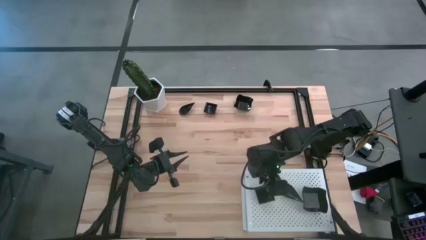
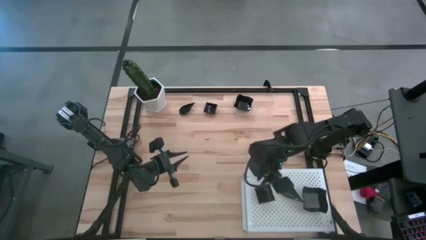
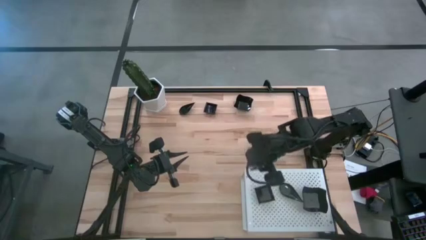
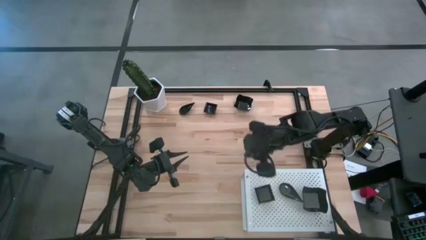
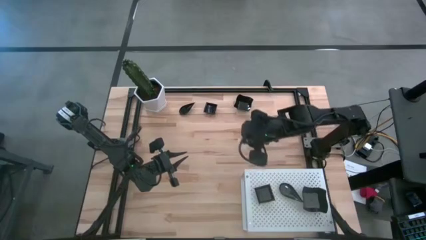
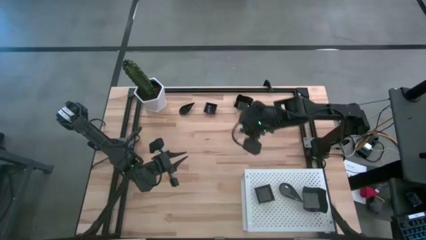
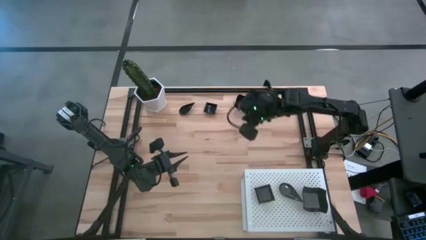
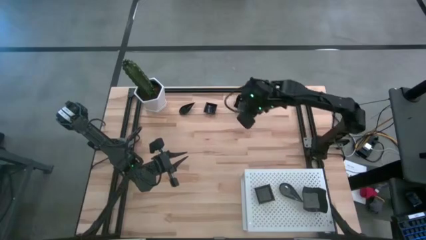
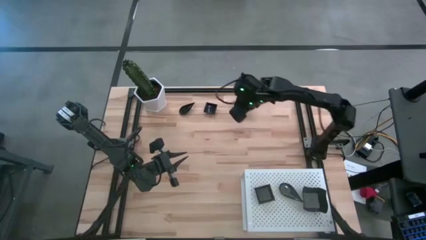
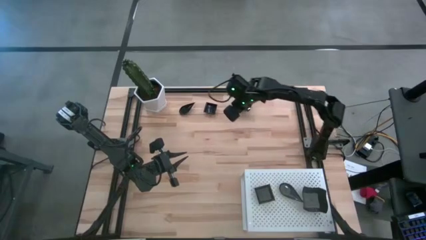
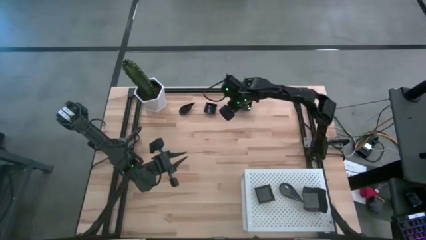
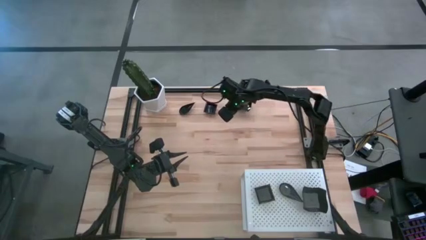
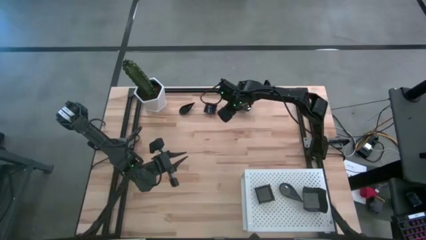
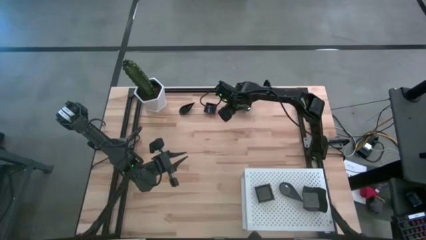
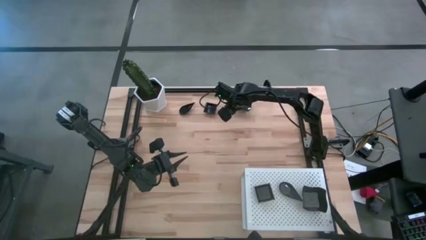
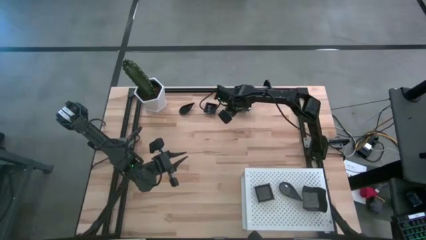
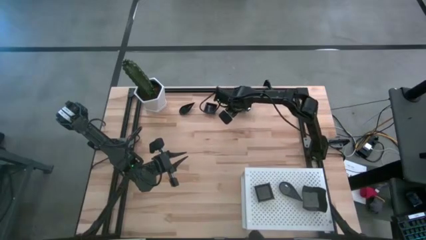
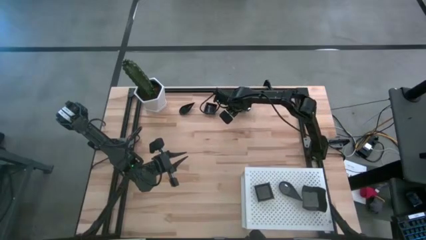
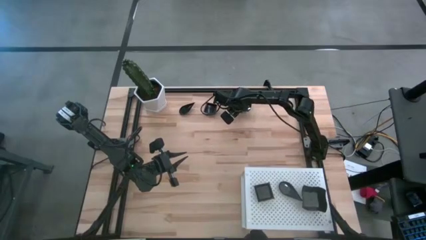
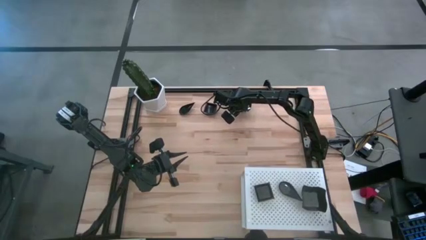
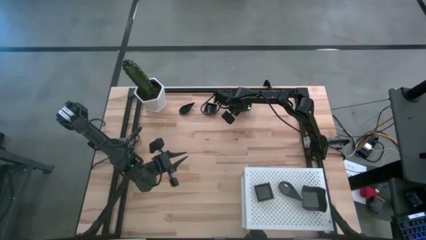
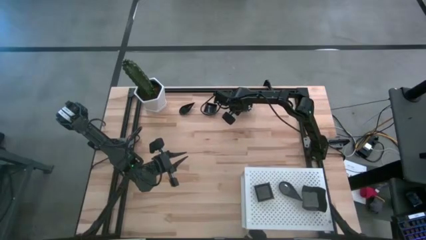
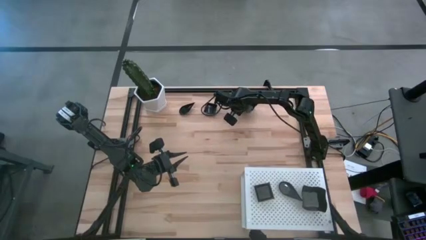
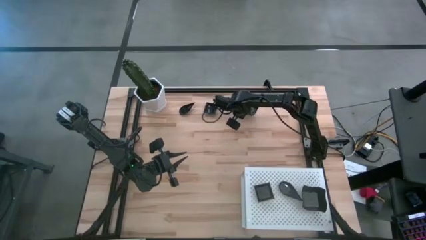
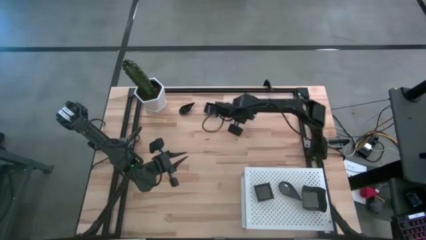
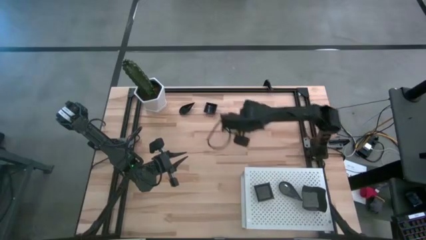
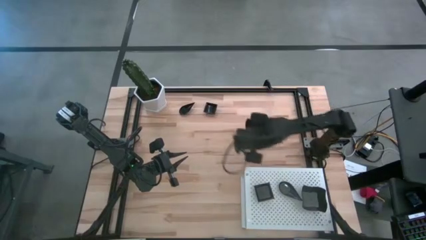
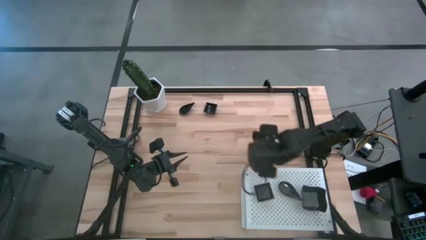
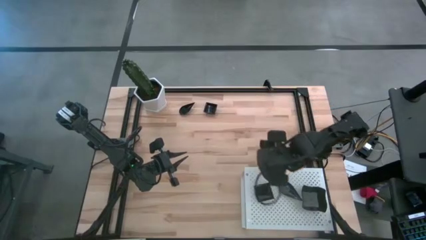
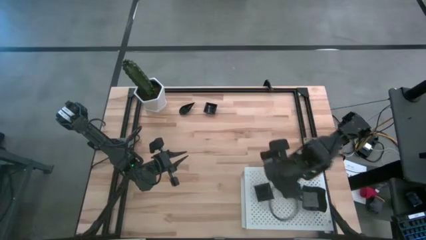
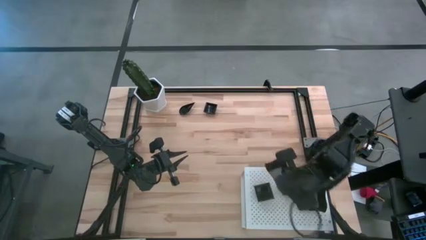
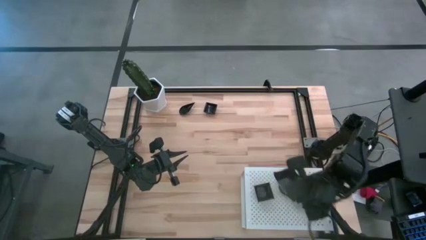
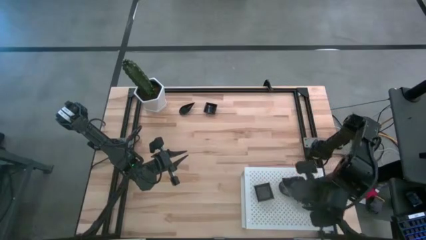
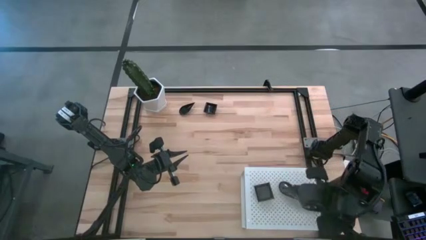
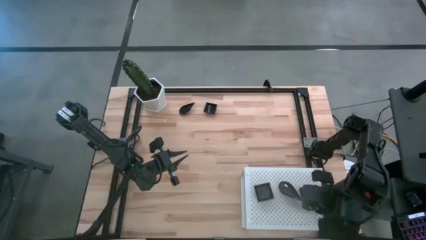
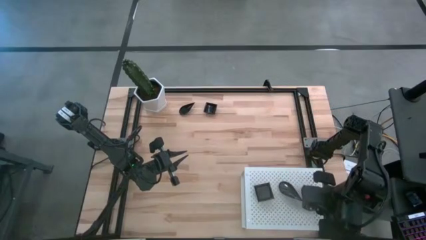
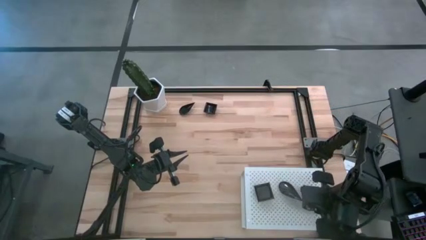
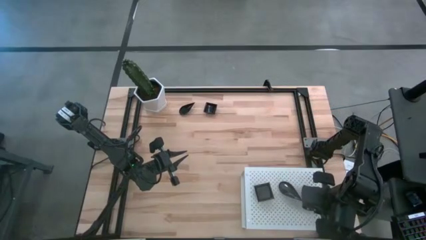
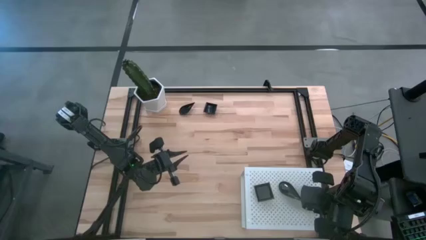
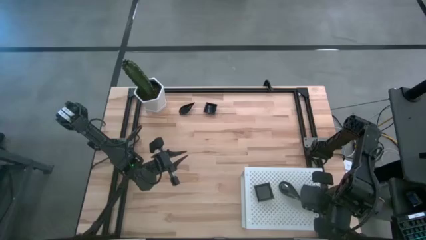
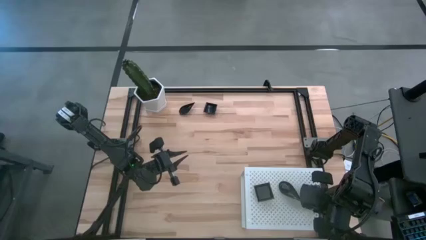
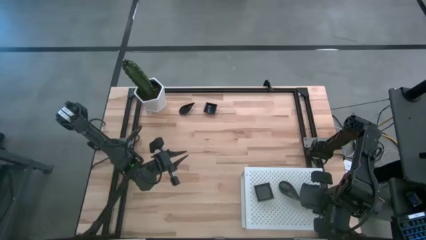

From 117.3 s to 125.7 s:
Task: Pick & Place Mini shaped plates
Stack the distorted square plate on top of the other distorted square plates on the shelf

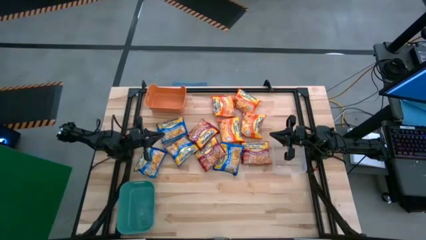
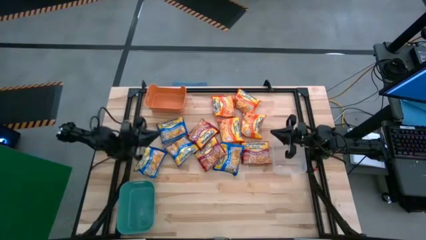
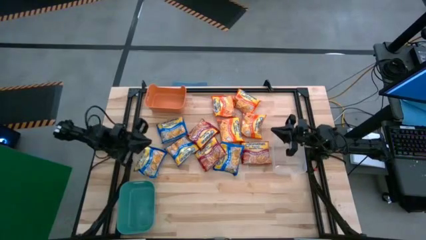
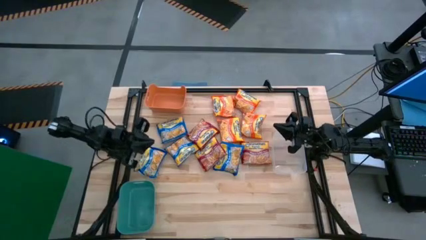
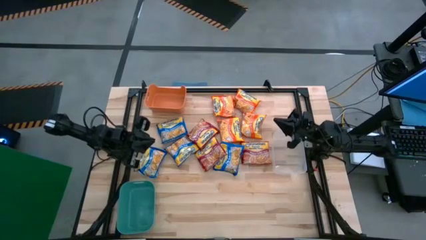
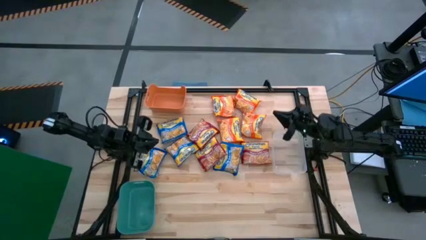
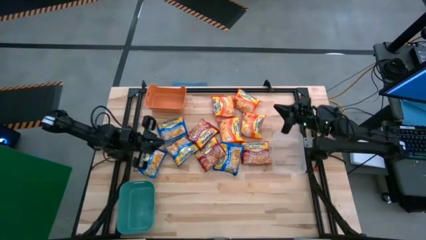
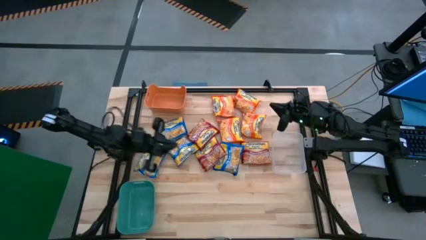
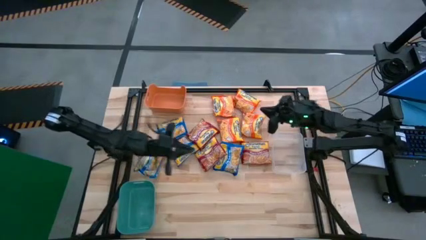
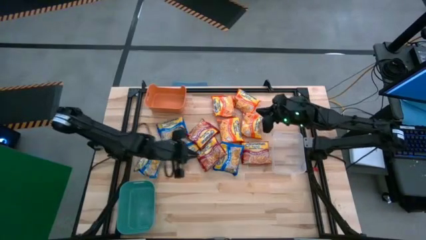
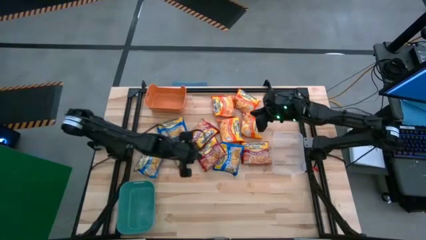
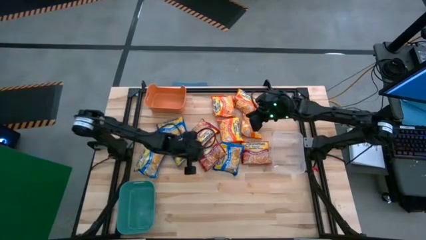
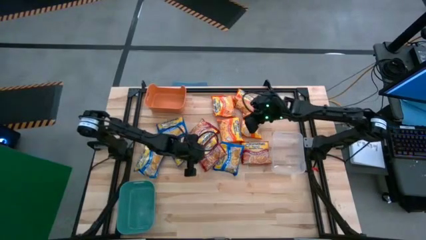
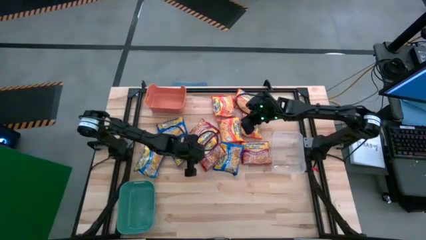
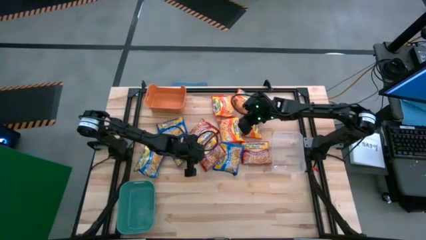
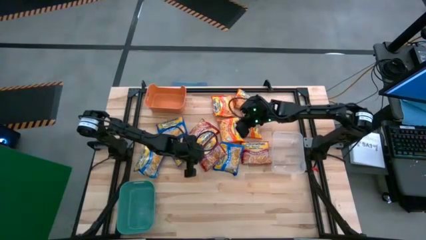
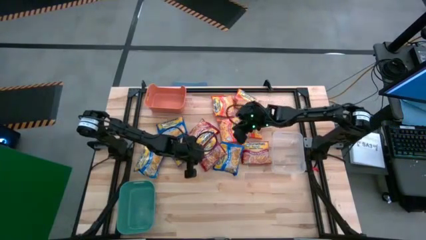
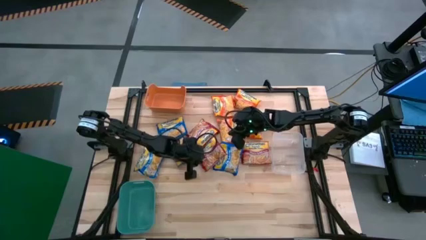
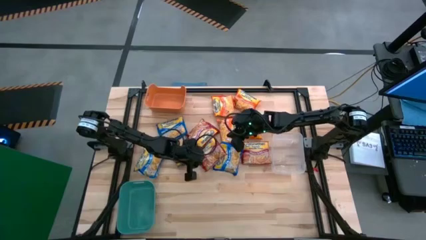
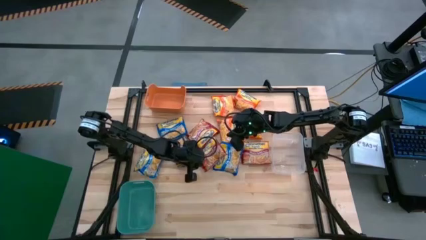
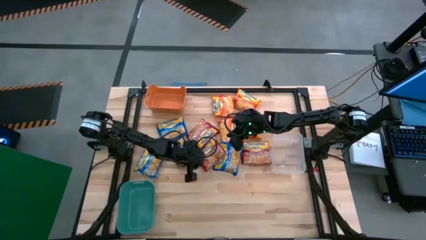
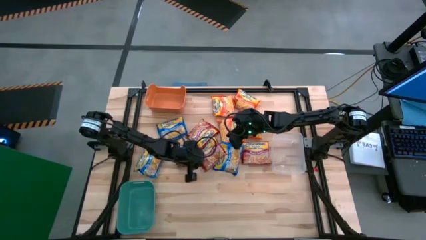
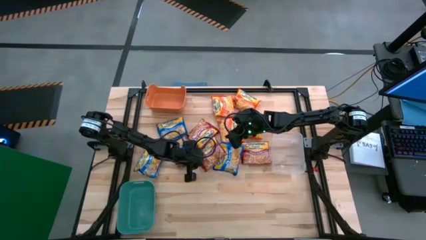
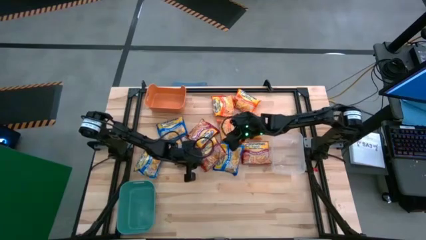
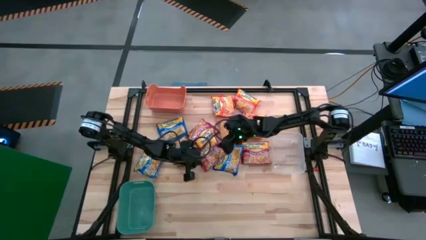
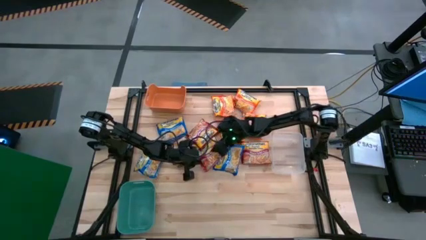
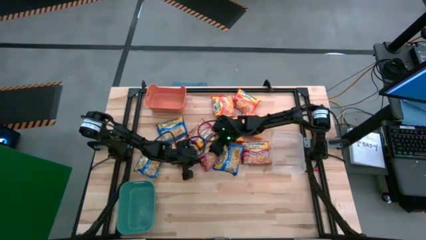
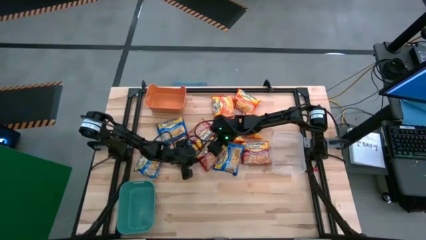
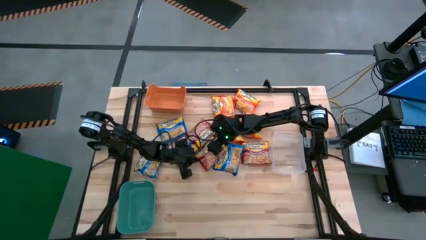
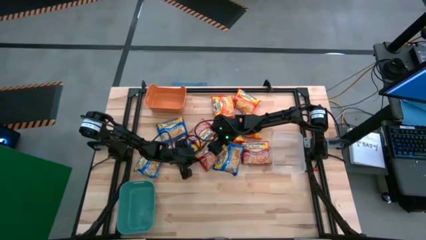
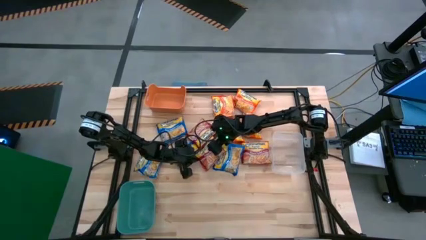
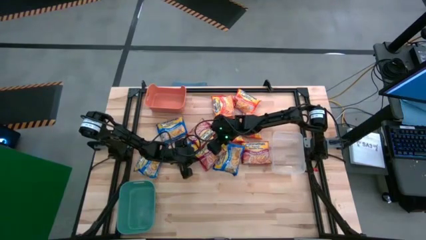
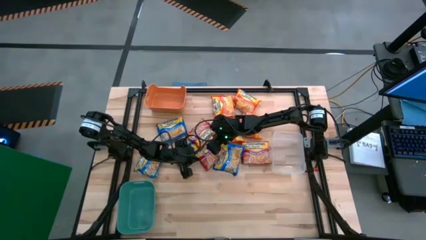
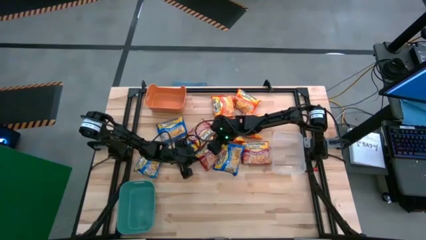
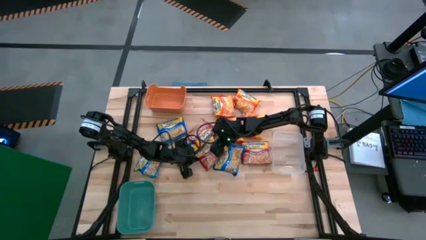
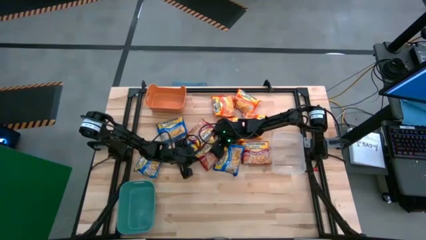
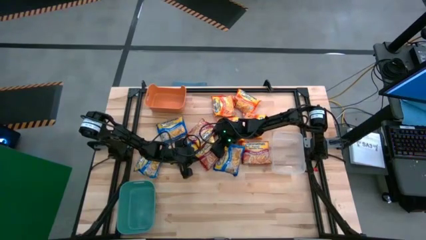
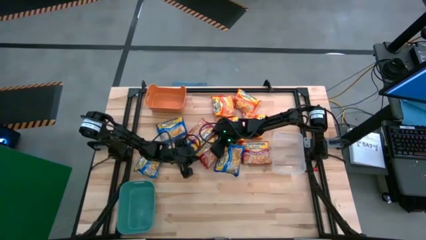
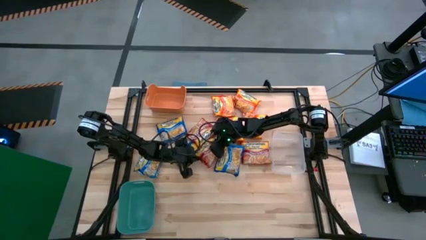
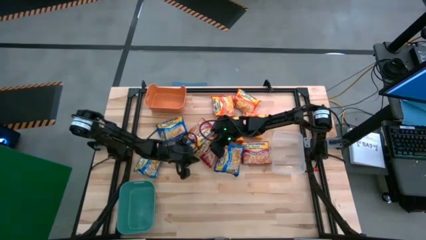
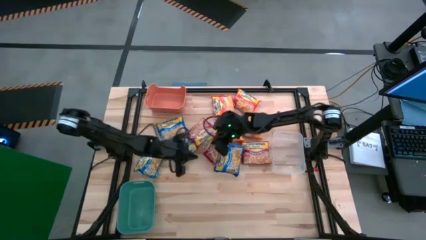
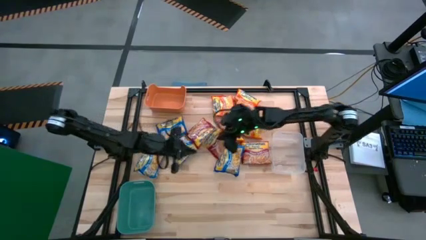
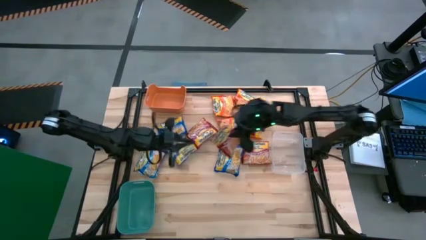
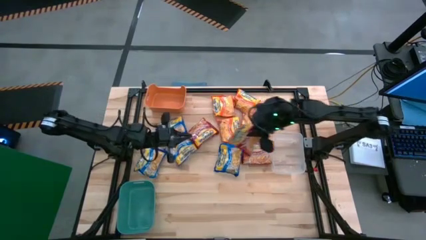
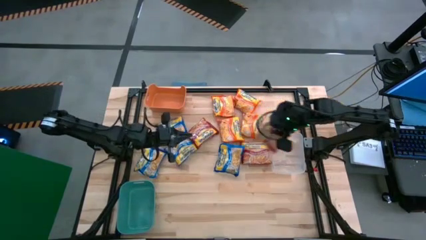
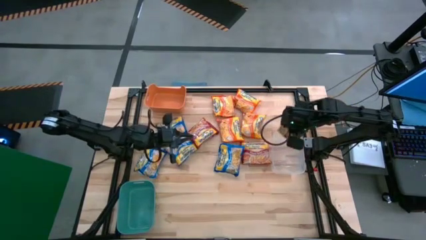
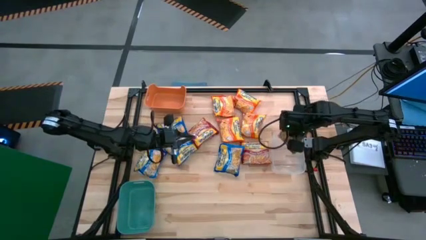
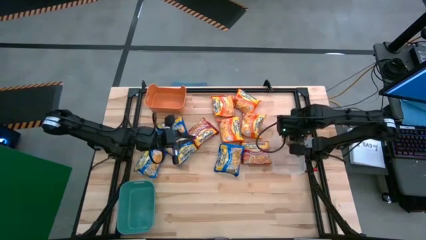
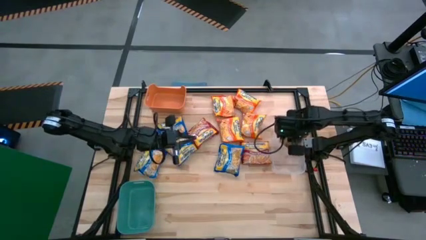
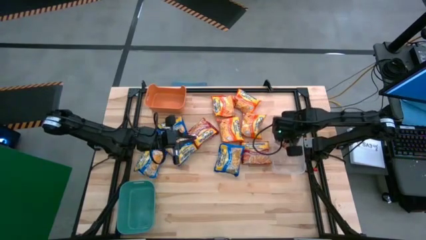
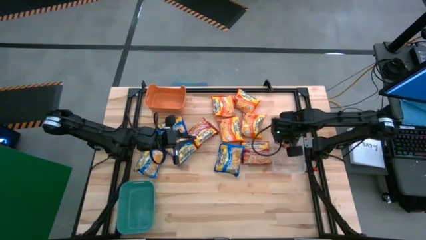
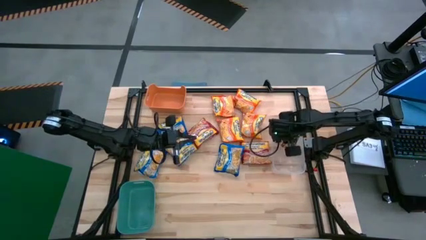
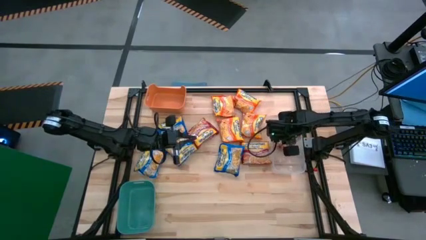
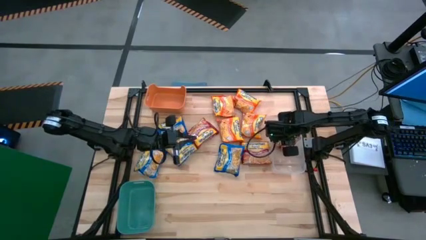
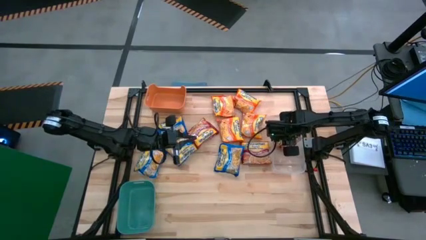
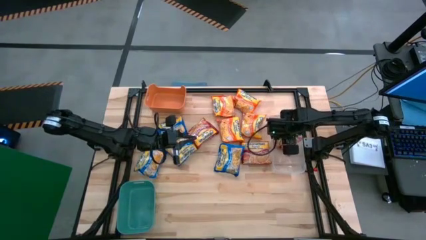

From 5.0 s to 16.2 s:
Task: Sort Maruchan noodles
Put the red noodle pack into the transparent bin
